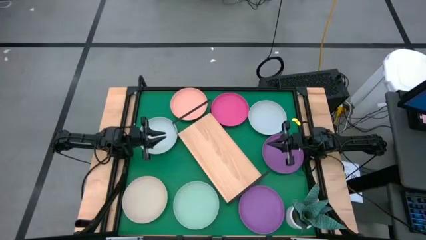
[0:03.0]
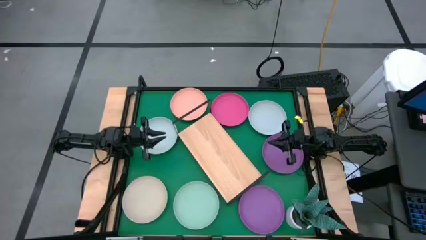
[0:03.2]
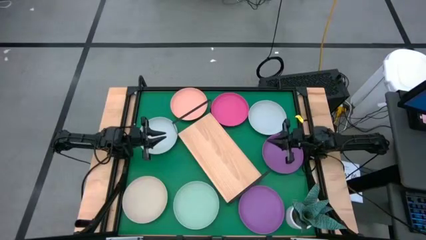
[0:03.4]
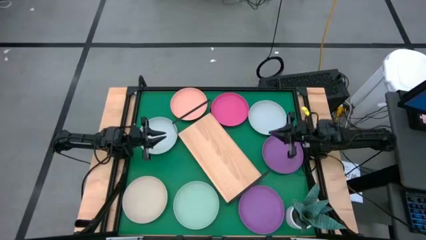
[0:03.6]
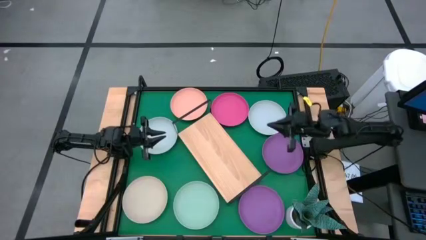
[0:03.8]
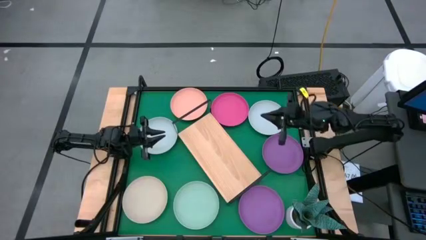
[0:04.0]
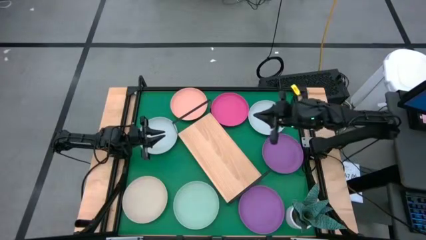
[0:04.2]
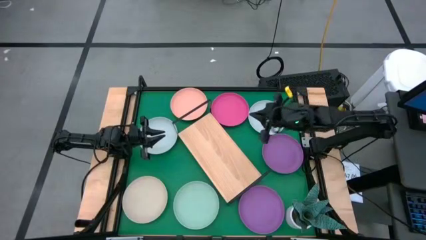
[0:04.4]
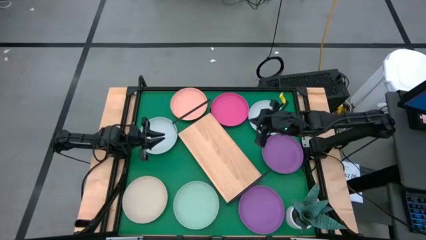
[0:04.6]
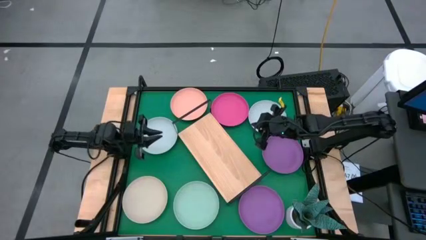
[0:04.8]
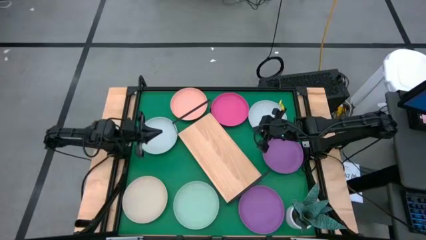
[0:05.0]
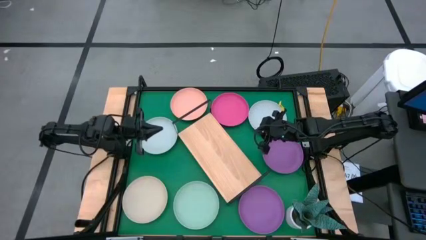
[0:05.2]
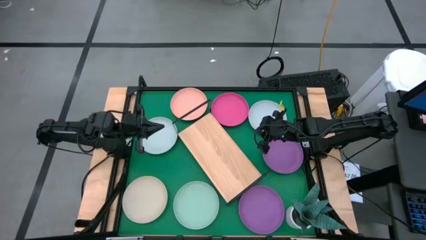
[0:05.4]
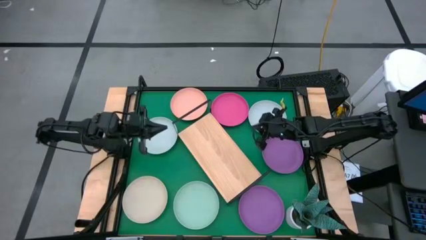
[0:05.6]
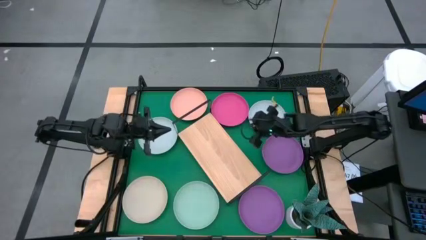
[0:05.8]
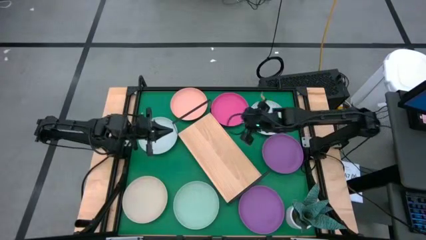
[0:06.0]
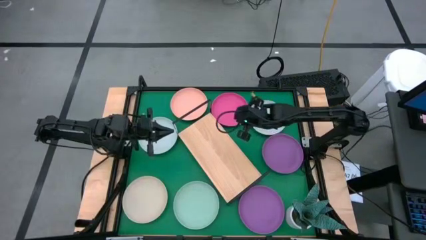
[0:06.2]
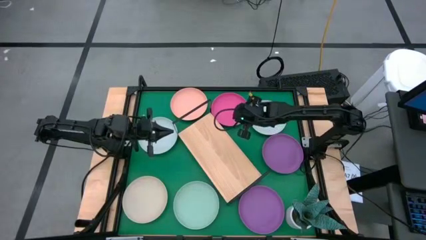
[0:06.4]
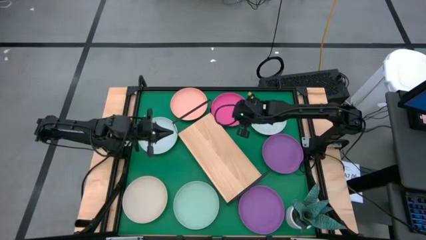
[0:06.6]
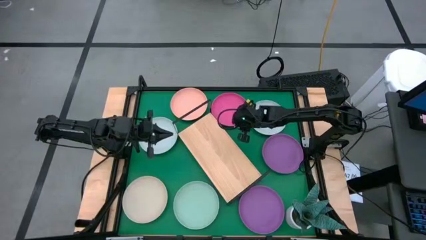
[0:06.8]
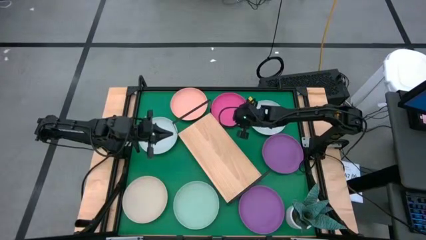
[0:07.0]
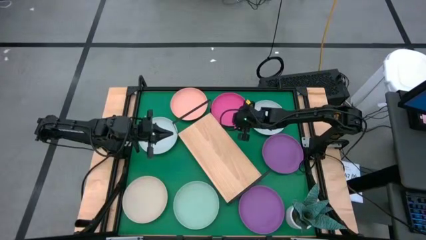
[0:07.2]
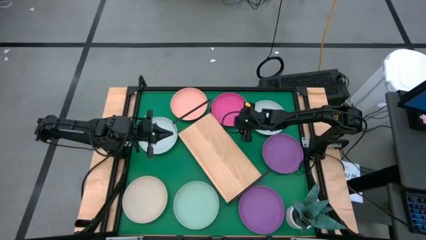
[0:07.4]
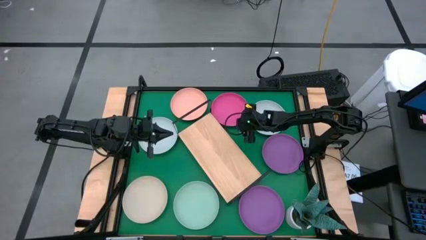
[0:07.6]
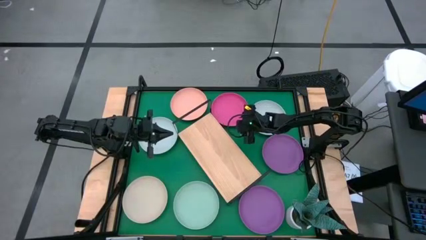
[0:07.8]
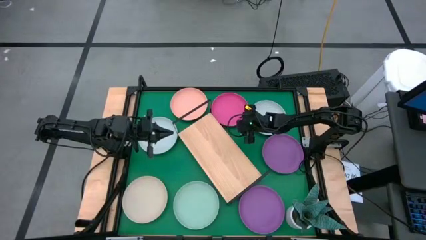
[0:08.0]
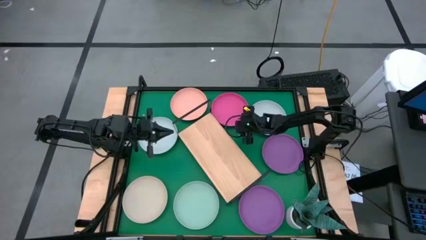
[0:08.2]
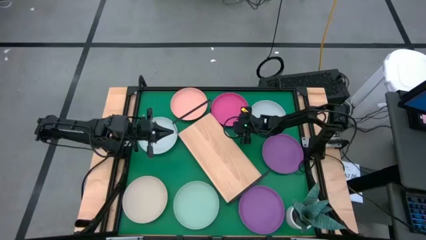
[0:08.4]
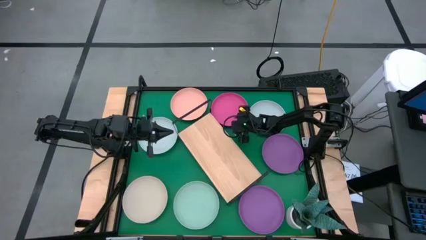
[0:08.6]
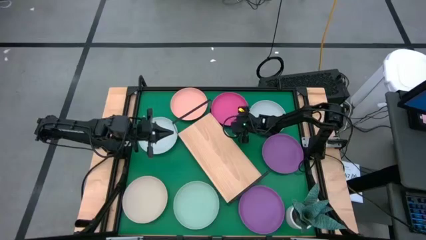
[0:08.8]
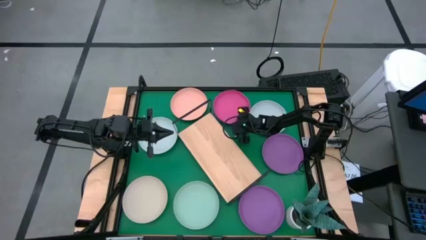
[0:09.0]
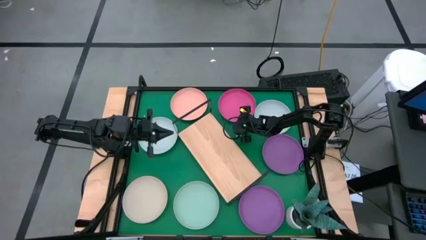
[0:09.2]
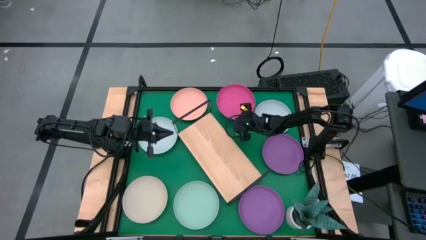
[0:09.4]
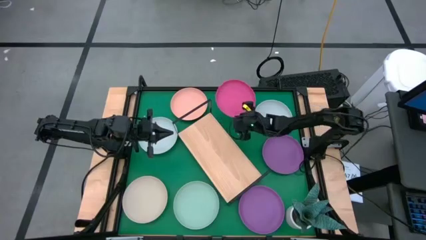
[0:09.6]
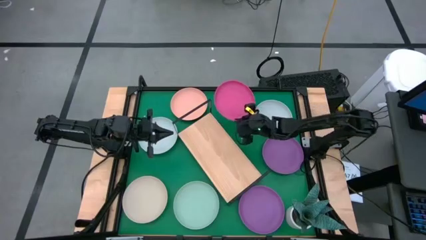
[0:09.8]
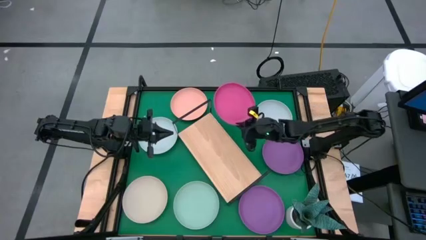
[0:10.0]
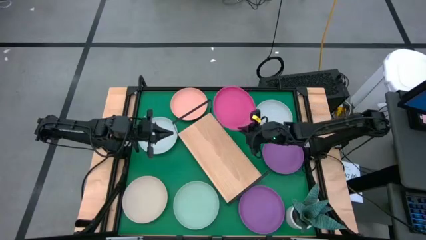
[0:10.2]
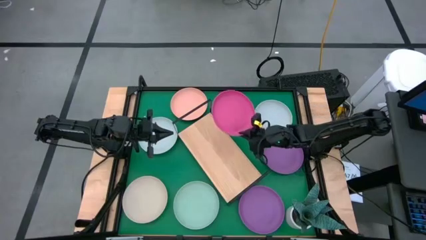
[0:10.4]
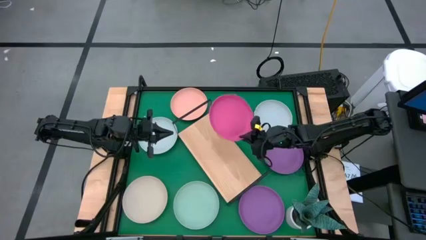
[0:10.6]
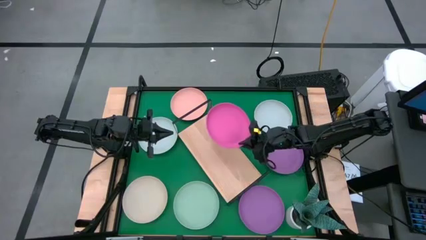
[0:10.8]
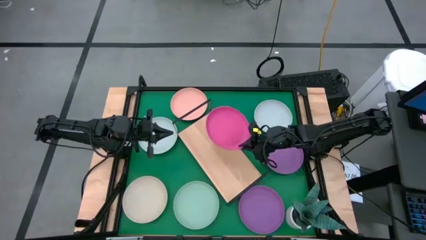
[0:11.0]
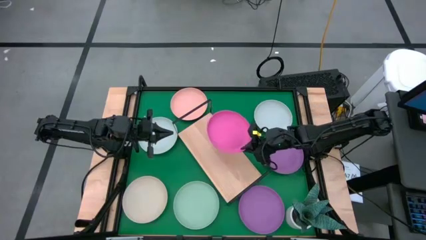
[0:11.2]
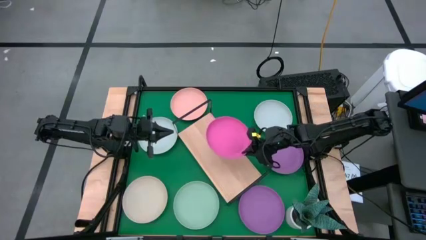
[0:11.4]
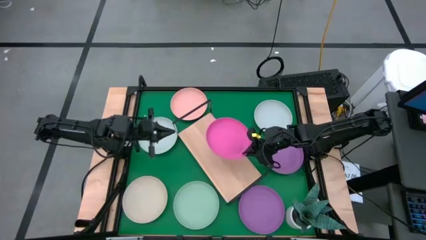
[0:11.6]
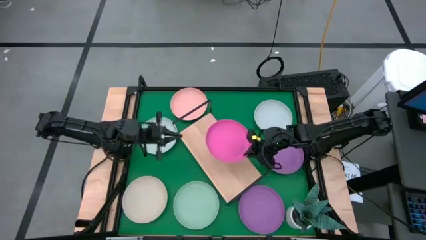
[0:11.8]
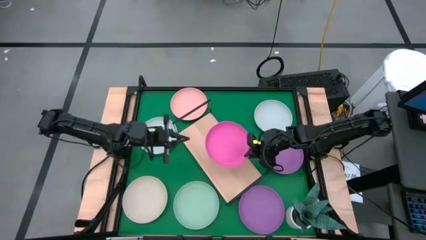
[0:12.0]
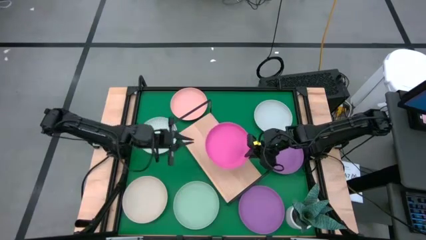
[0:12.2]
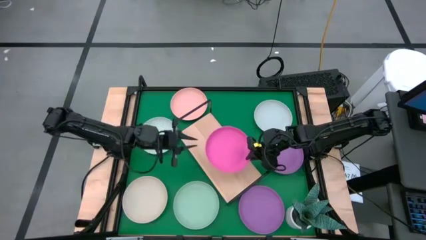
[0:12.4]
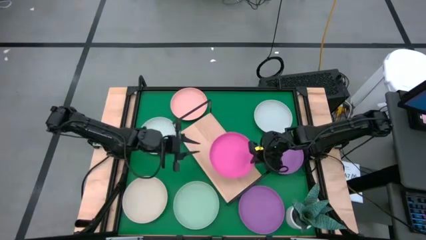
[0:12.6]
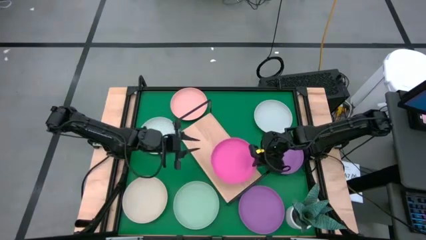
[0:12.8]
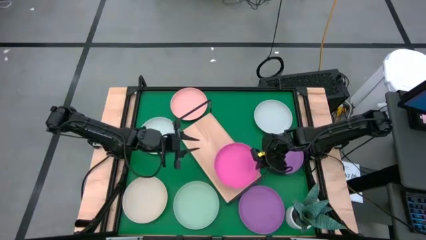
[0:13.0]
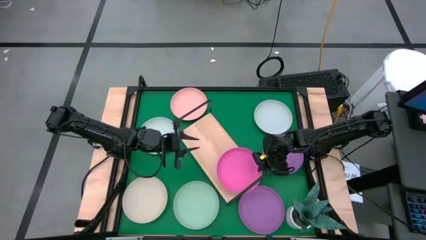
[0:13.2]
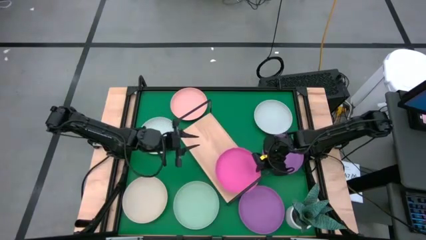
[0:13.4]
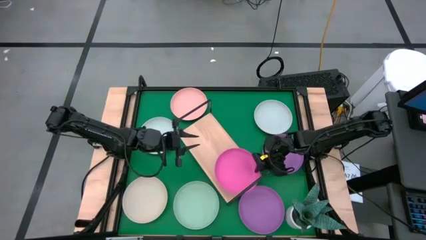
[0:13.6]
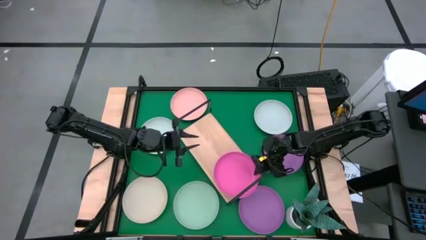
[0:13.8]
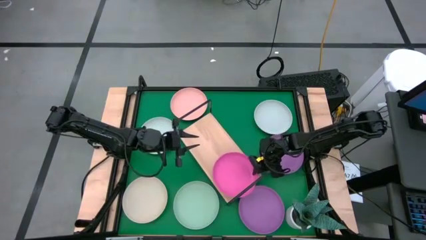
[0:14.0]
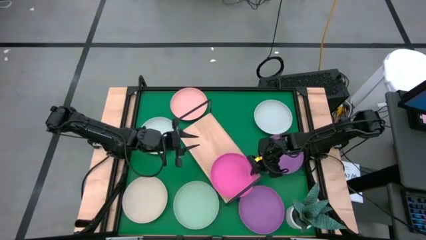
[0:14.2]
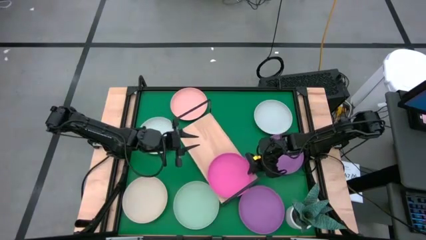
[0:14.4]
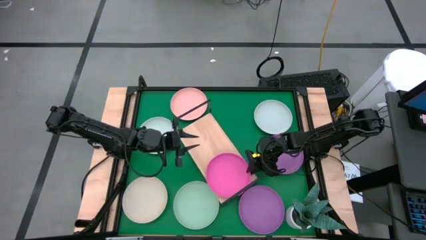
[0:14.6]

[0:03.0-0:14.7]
Task: Place and stack plates onto a shelf
Put the pink plate on the shelf

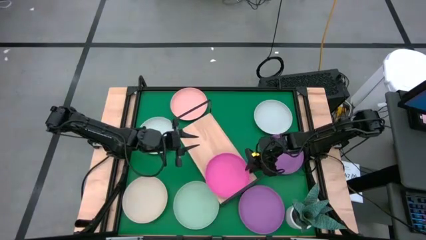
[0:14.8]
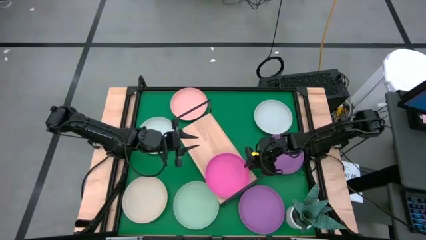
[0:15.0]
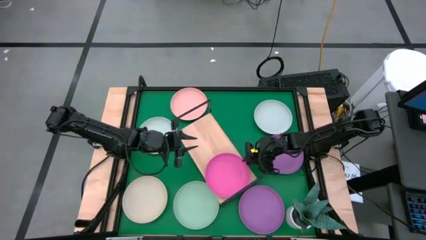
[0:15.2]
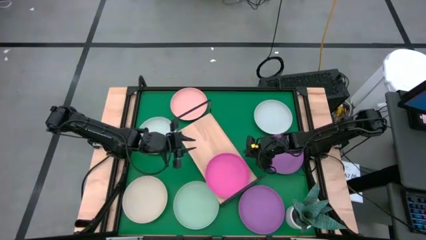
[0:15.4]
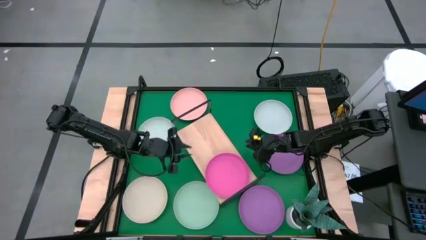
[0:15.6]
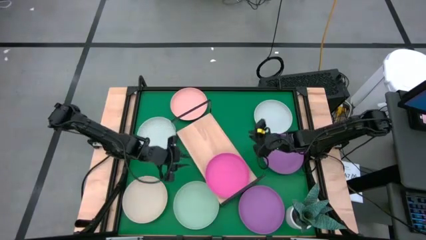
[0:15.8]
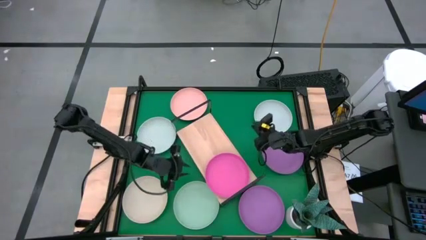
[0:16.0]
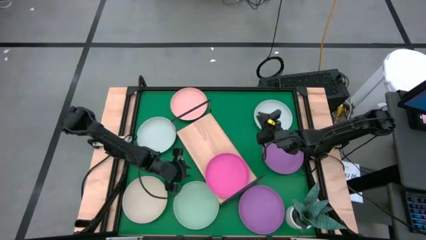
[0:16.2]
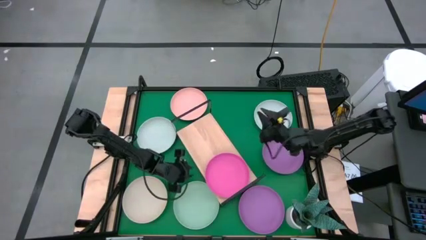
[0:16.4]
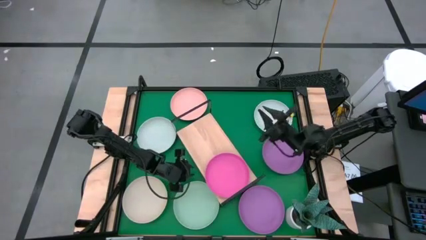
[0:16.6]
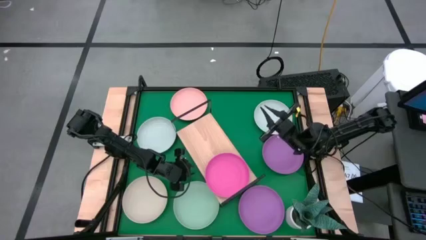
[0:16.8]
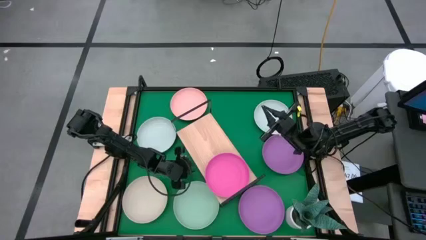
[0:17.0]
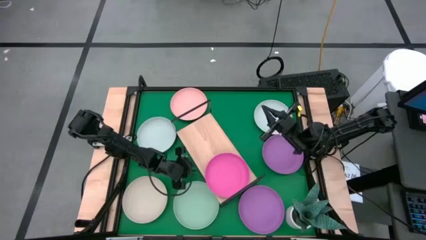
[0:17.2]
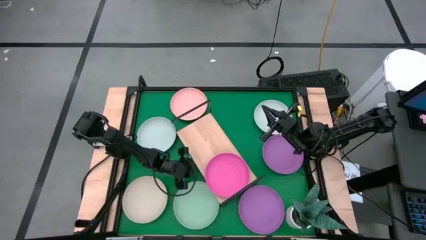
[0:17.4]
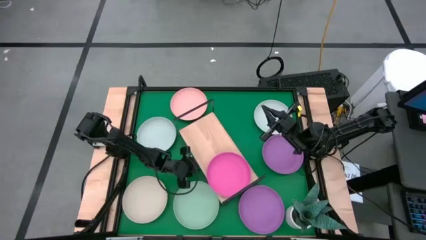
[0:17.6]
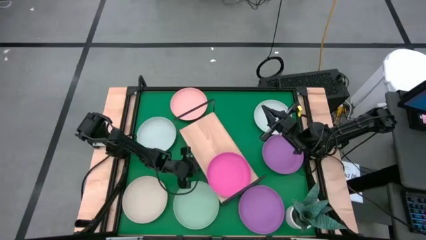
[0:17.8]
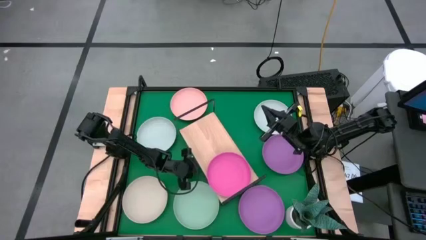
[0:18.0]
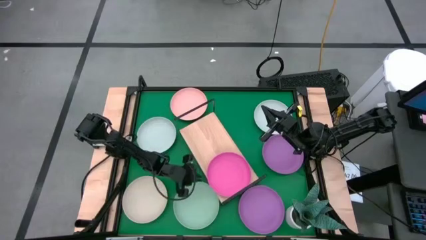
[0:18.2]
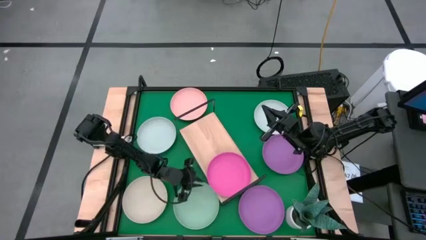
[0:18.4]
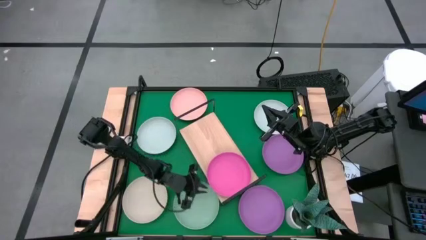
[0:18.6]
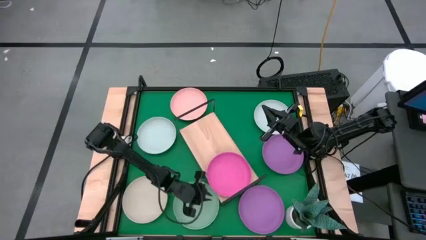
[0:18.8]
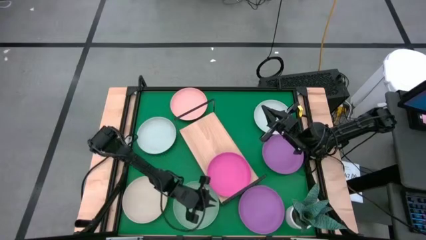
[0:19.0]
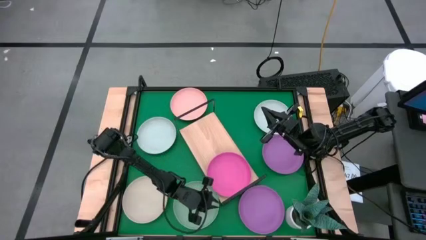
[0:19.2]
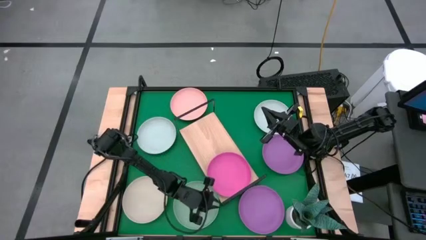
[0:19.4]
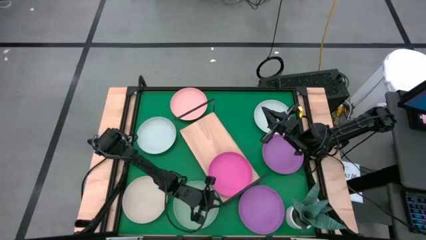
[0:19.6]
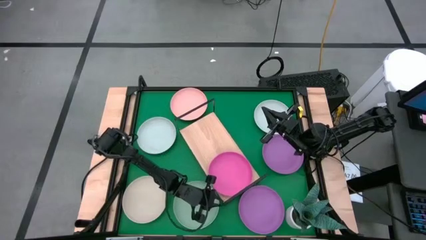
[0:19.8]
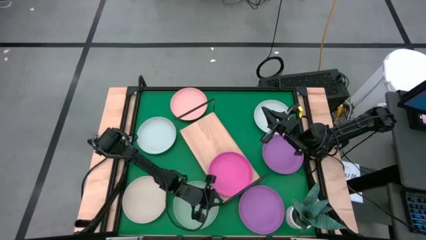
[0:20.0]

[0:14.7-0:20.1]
Adjust the shelf on the table
